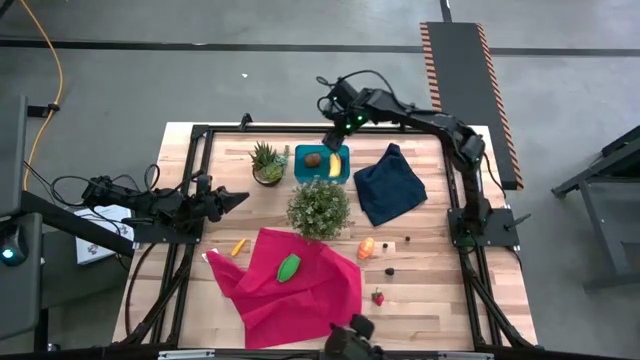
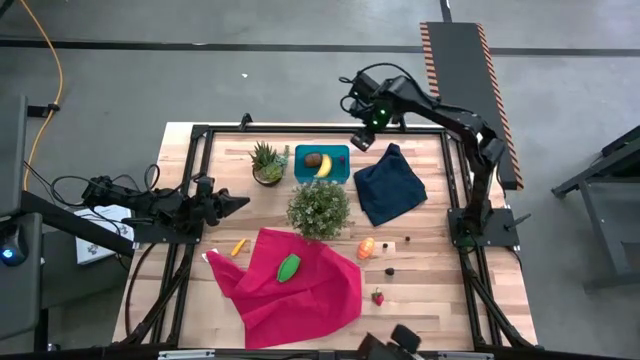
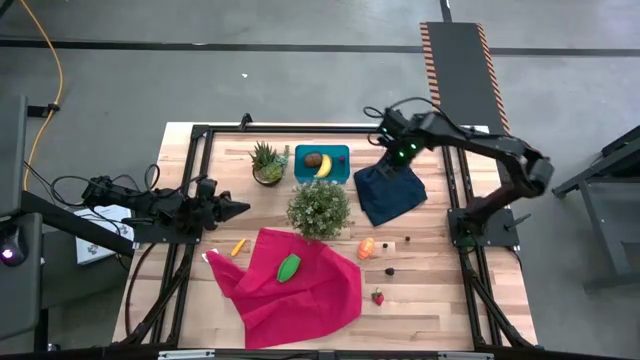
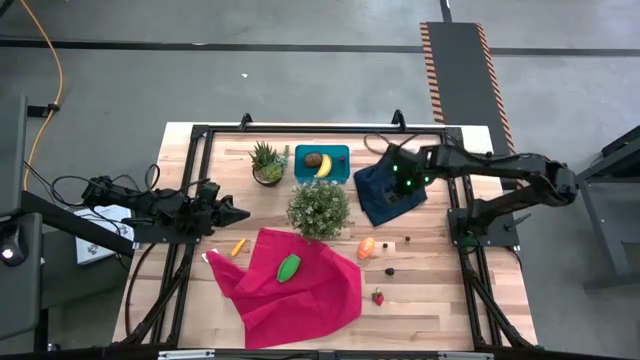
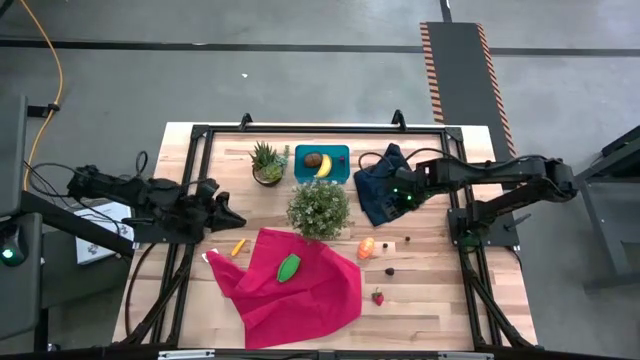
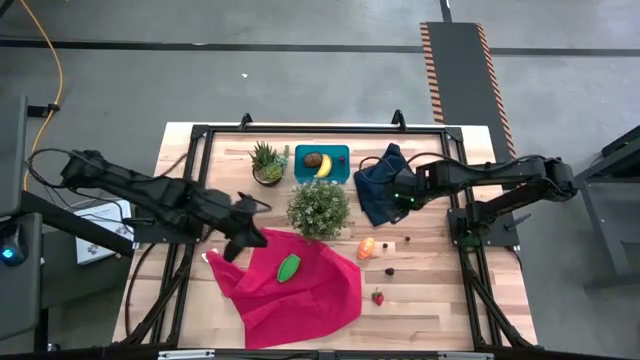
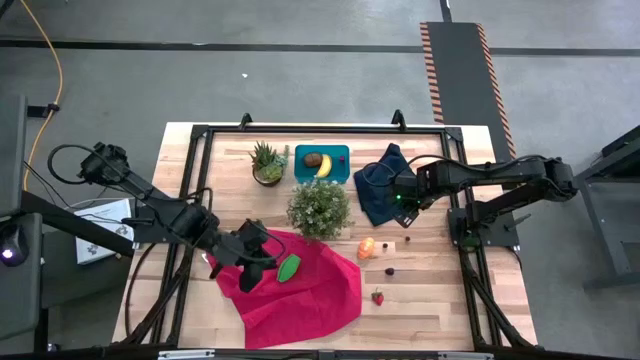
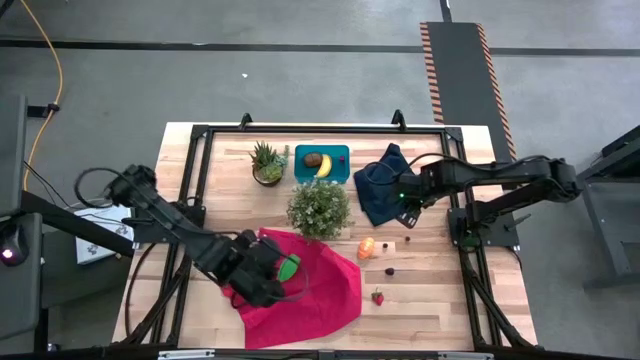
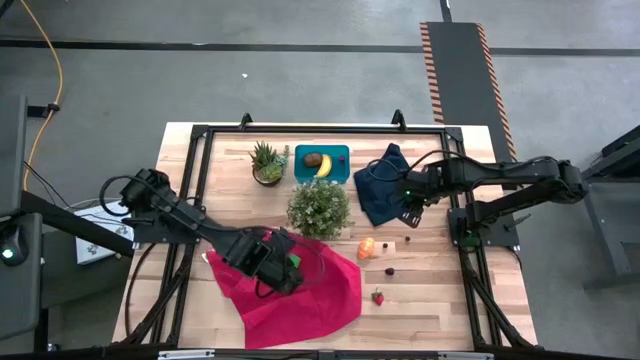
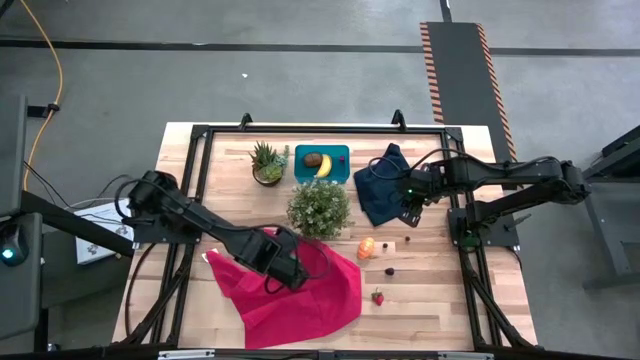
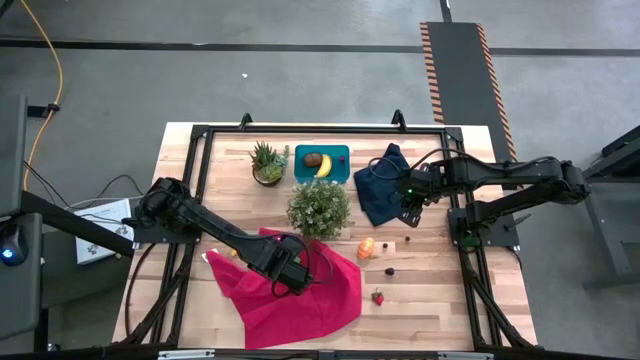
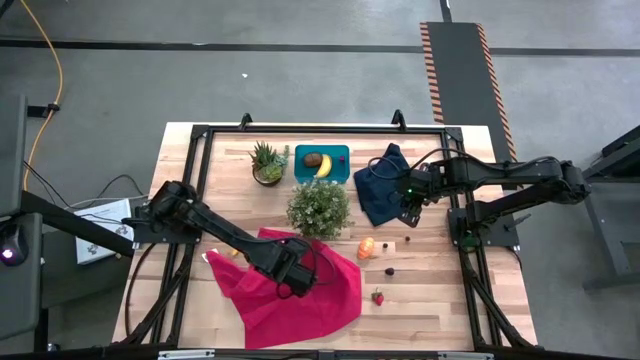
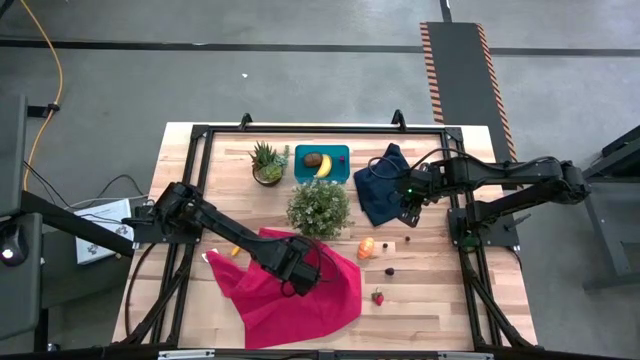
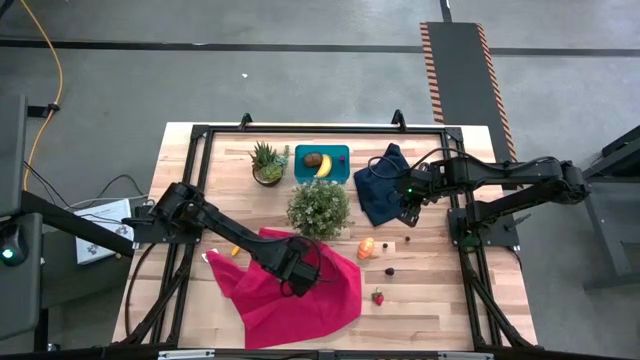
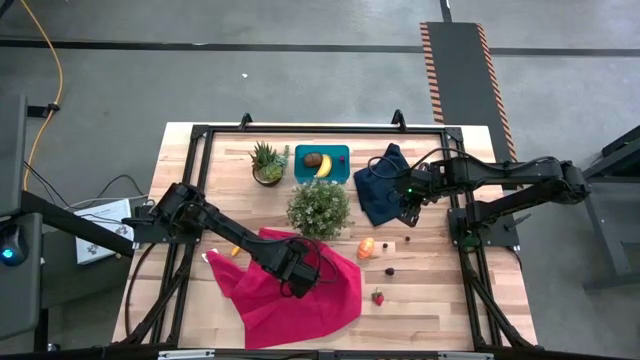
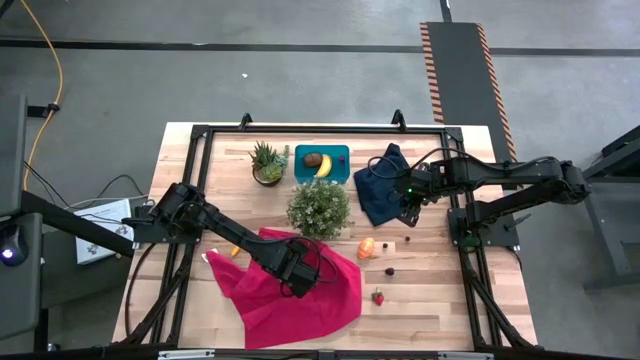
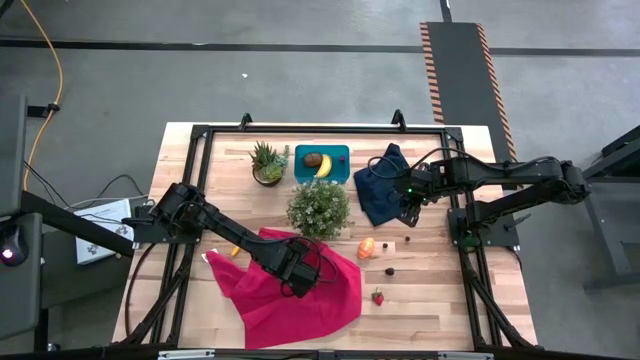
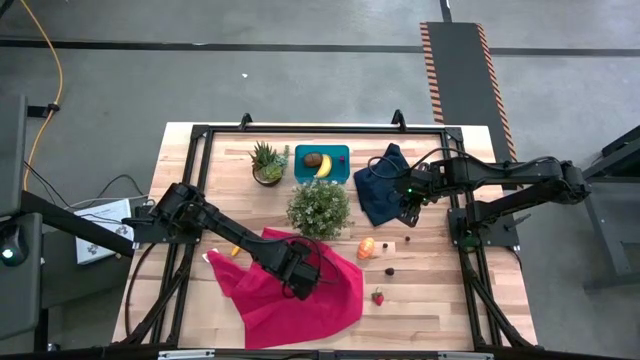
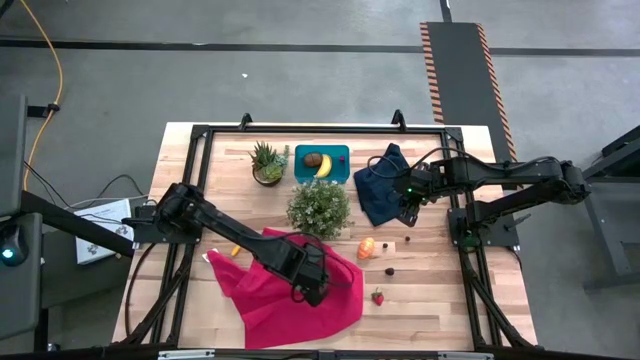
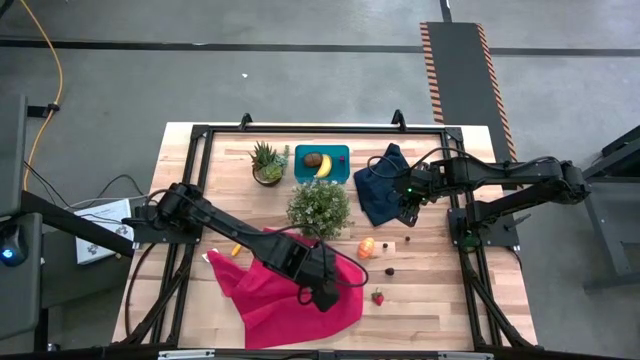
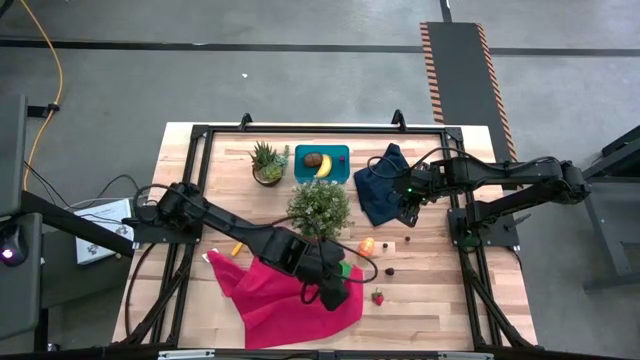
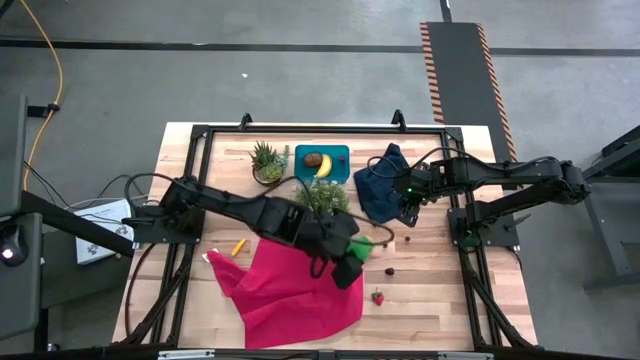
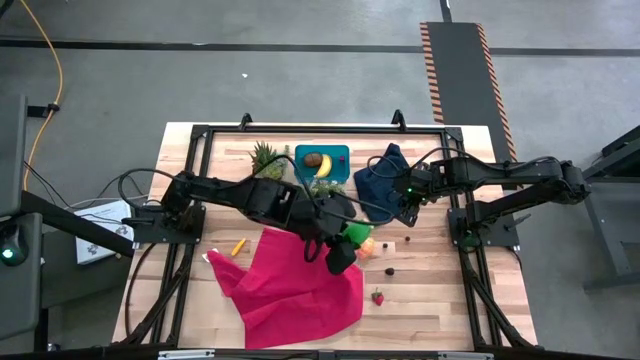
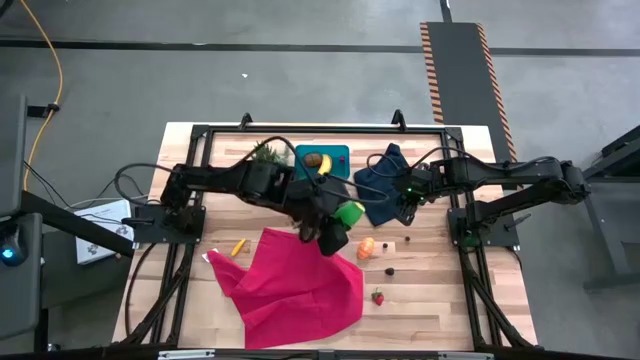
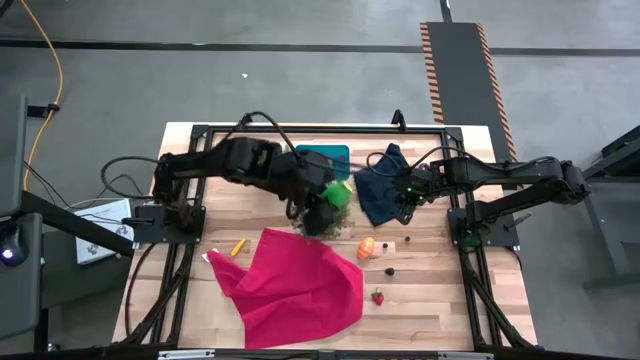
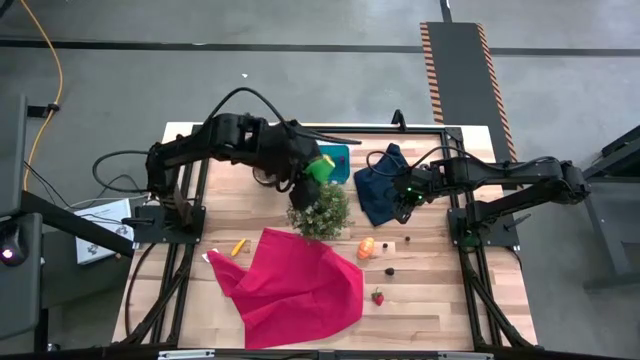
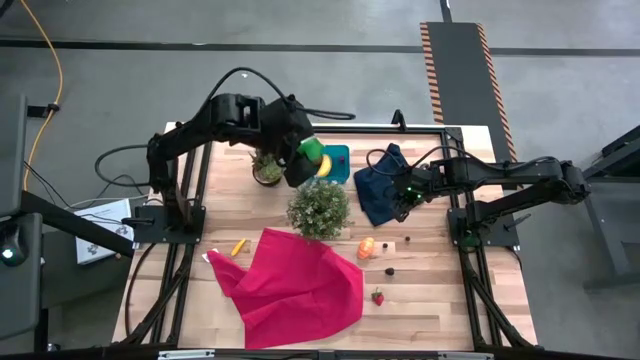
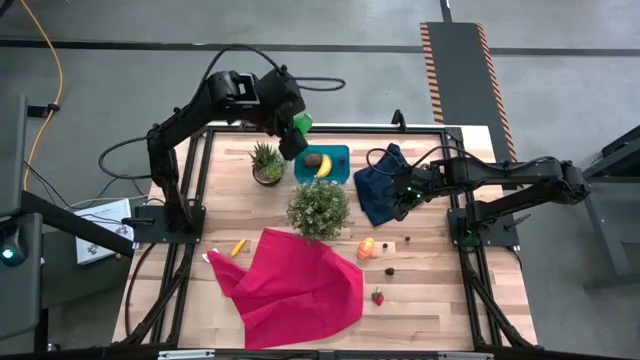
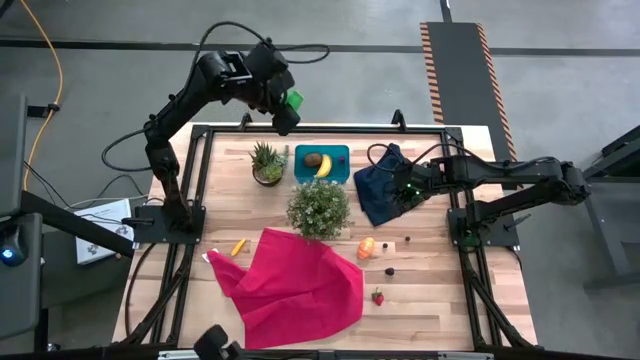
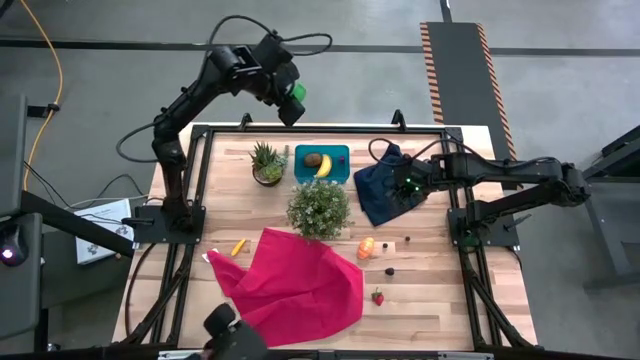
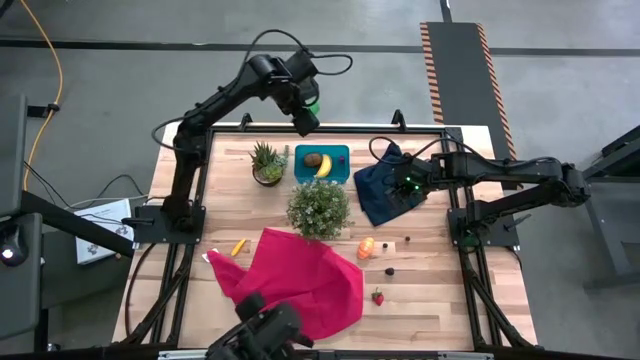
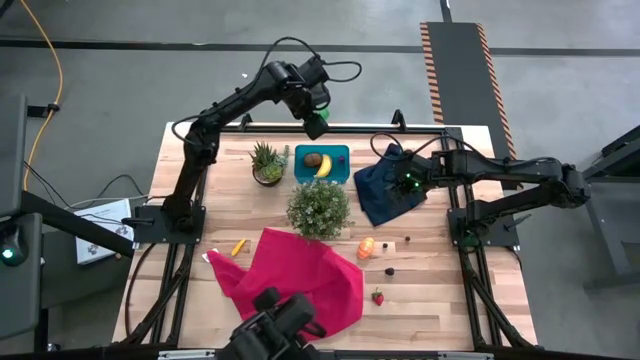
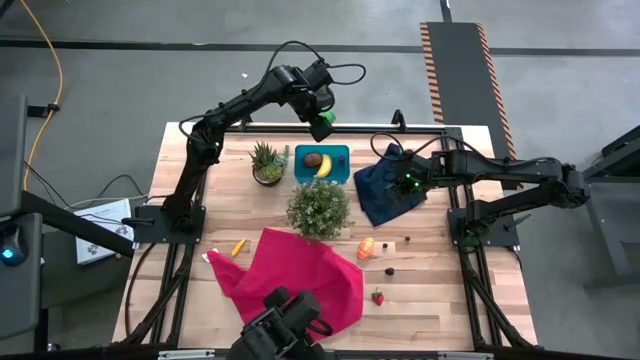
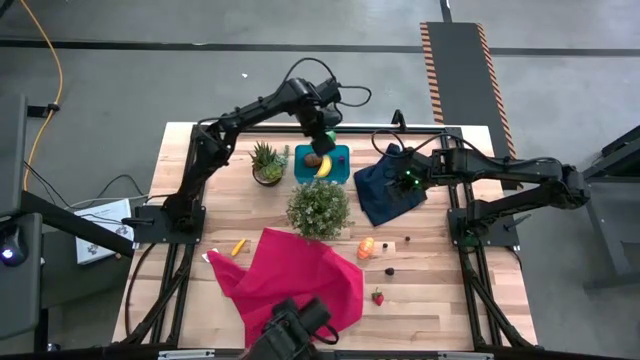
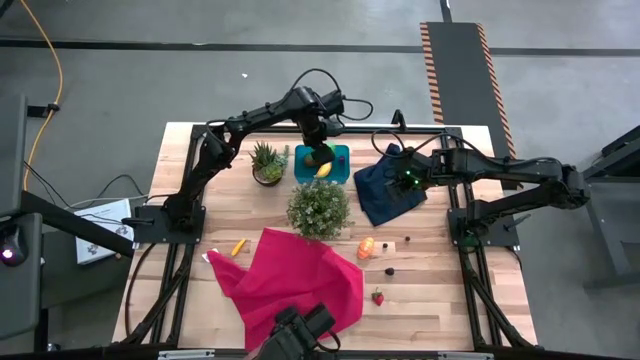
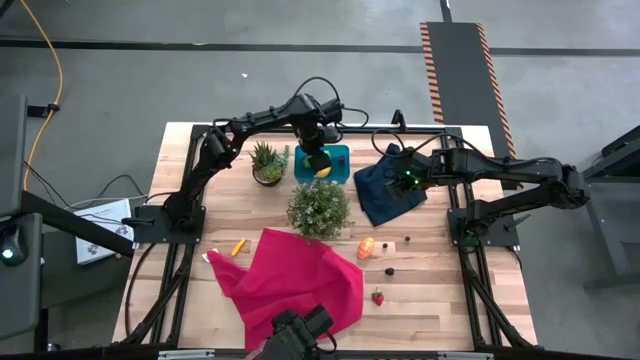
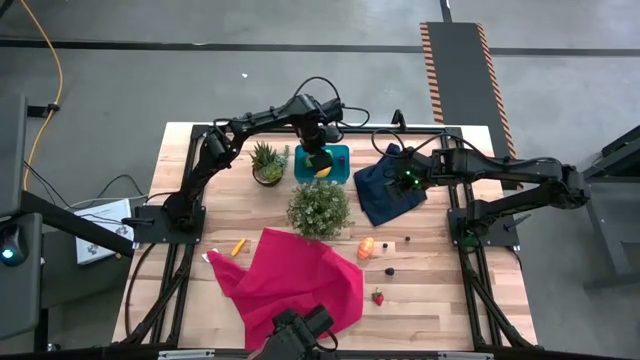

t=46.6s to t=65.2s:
Task: Pick and placing Produce into tupperware
Put the green corn into the blue bin
